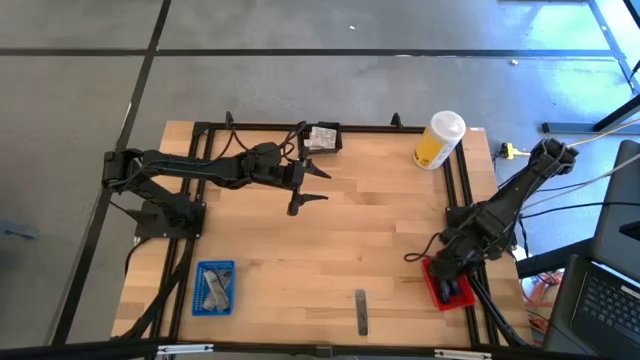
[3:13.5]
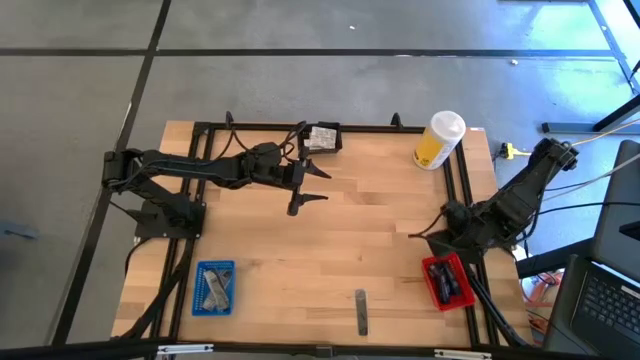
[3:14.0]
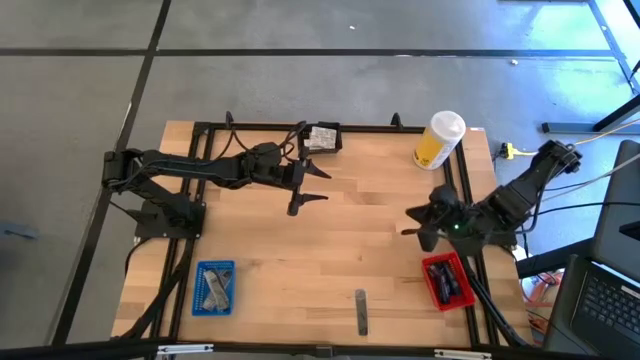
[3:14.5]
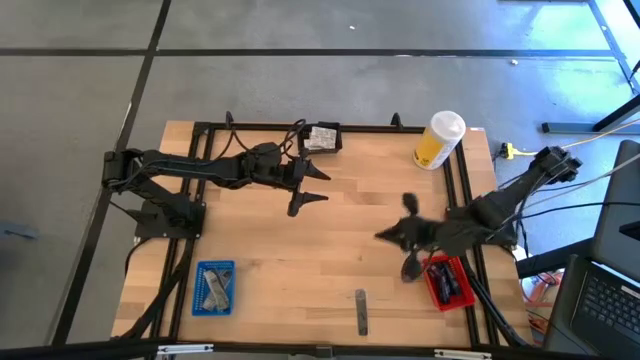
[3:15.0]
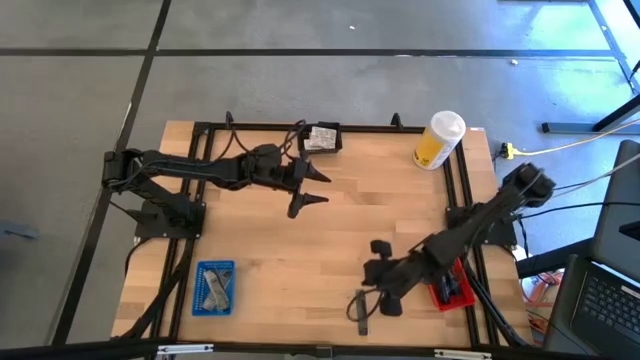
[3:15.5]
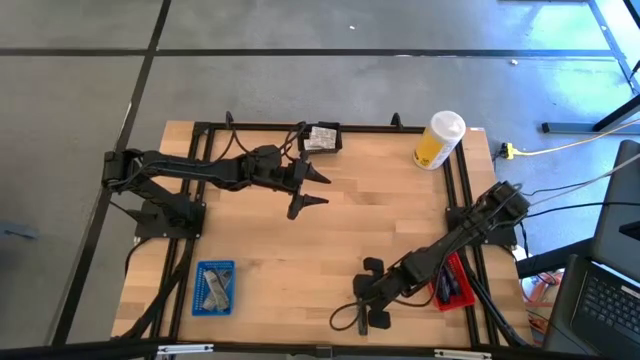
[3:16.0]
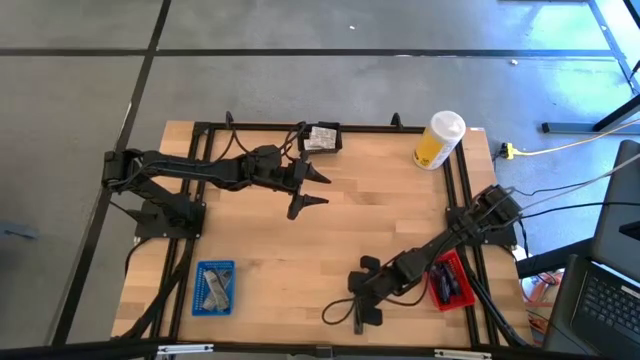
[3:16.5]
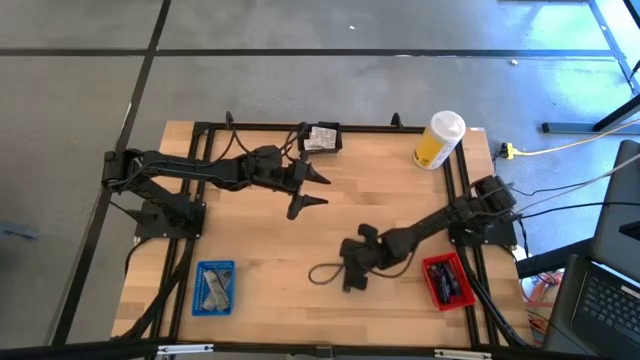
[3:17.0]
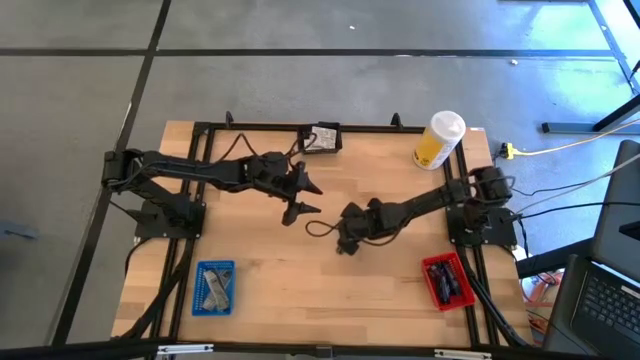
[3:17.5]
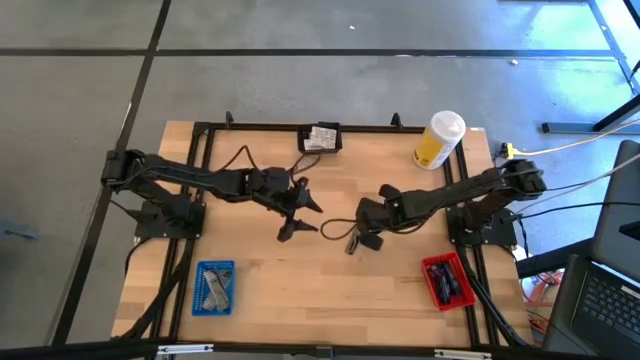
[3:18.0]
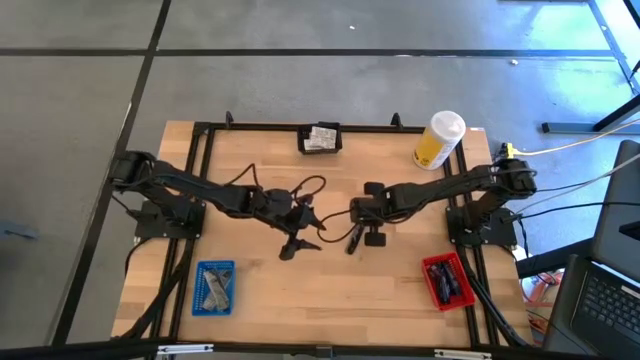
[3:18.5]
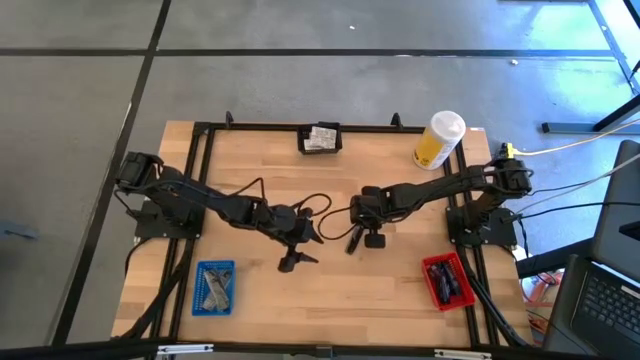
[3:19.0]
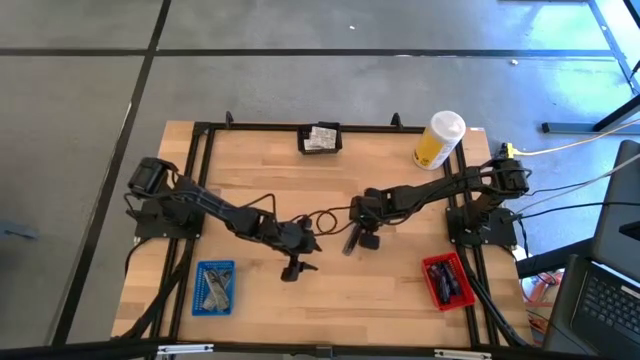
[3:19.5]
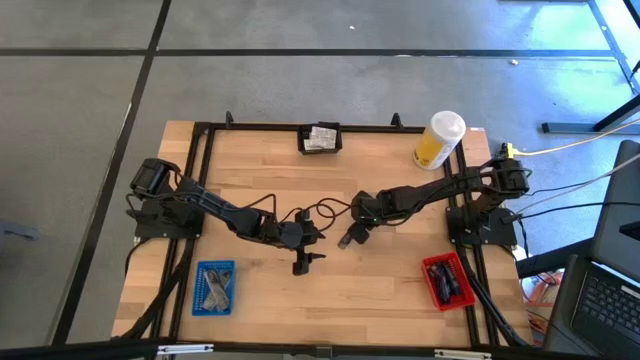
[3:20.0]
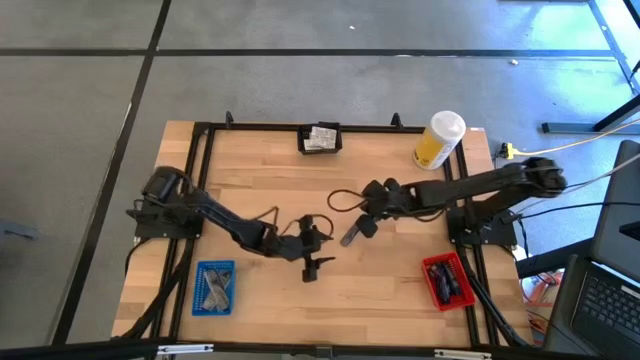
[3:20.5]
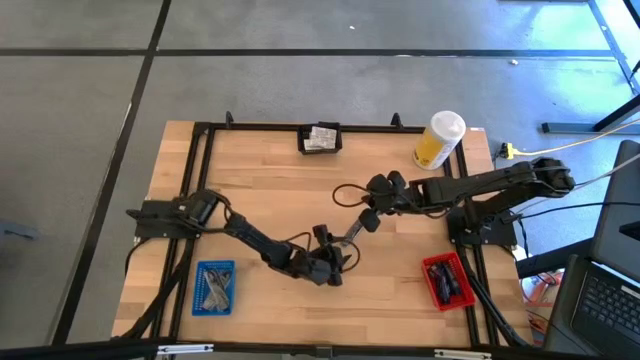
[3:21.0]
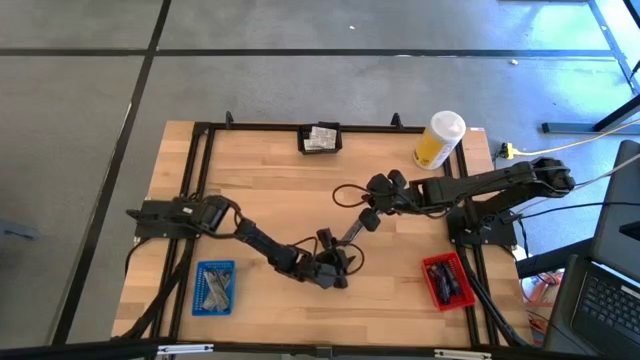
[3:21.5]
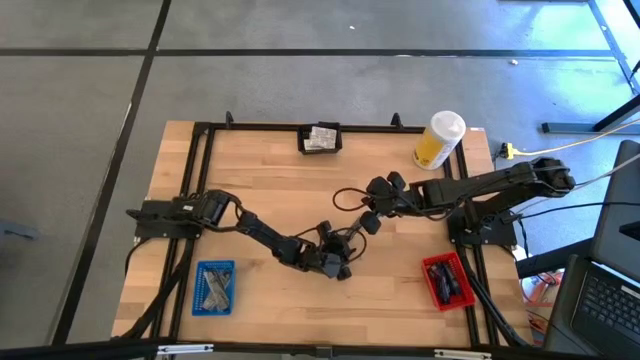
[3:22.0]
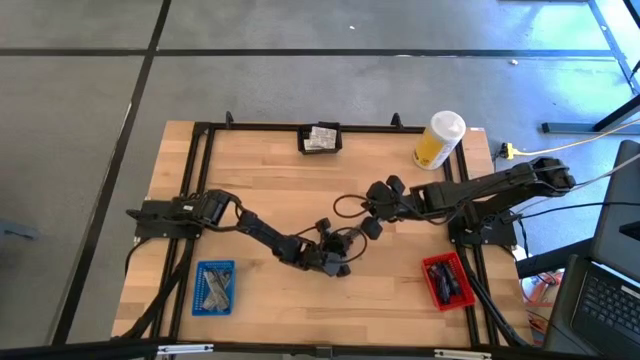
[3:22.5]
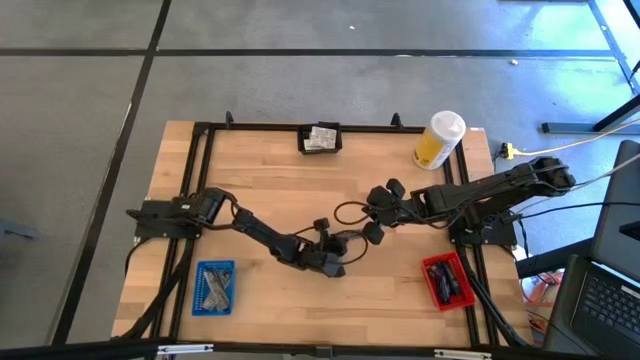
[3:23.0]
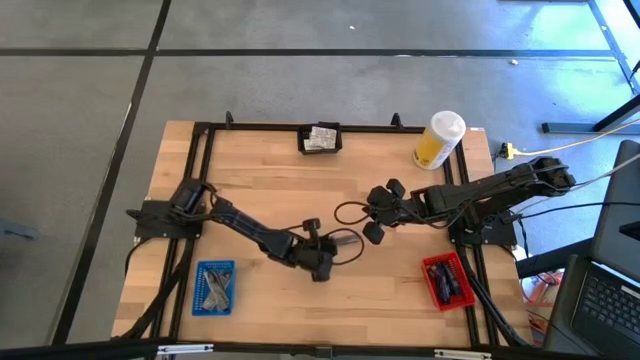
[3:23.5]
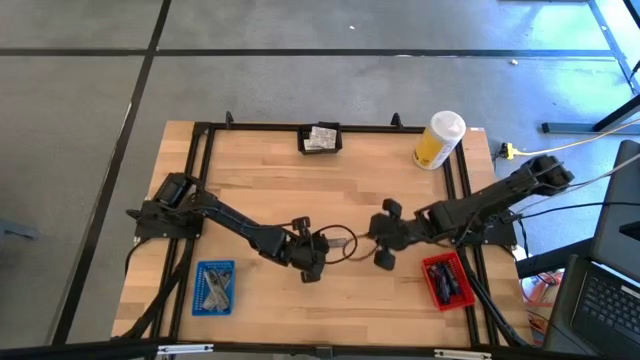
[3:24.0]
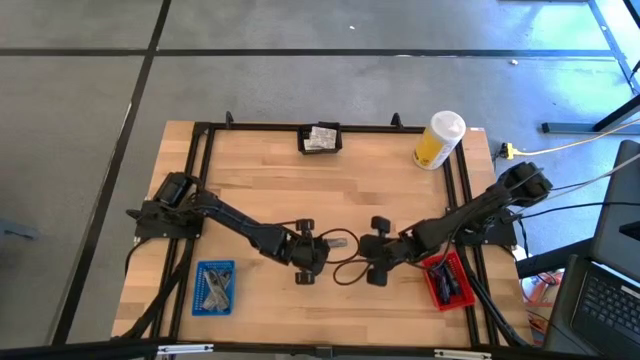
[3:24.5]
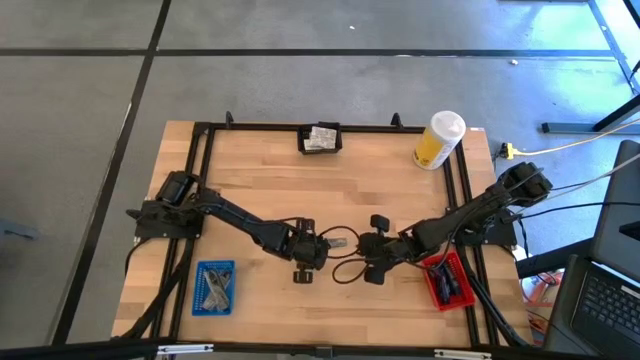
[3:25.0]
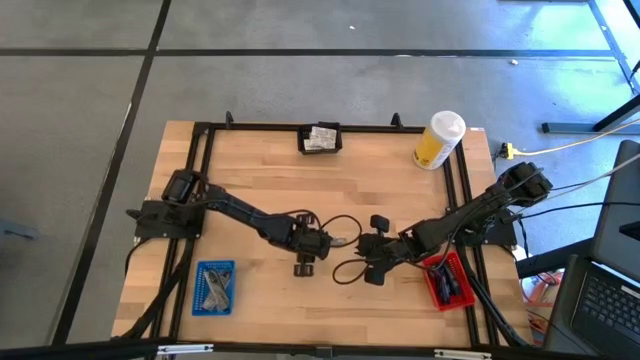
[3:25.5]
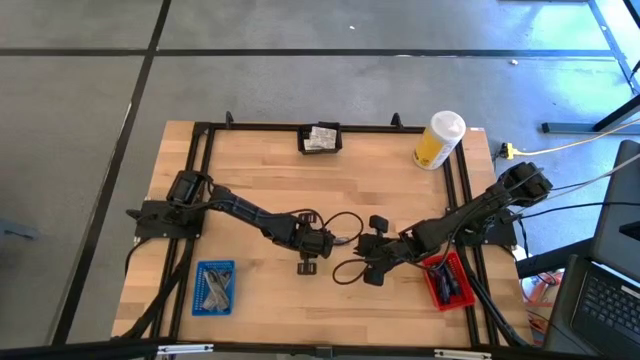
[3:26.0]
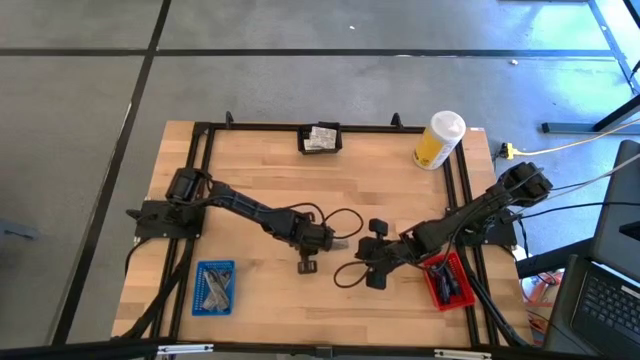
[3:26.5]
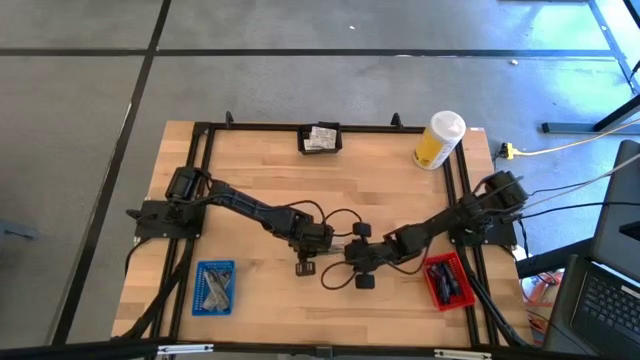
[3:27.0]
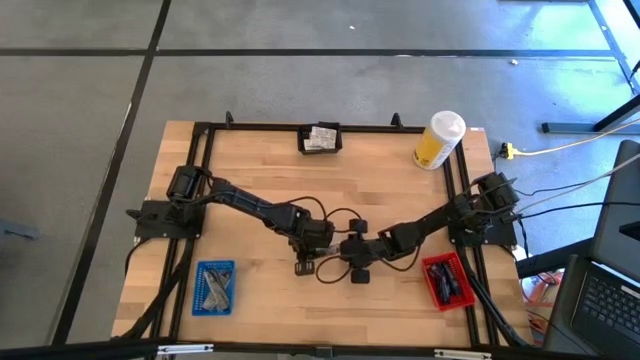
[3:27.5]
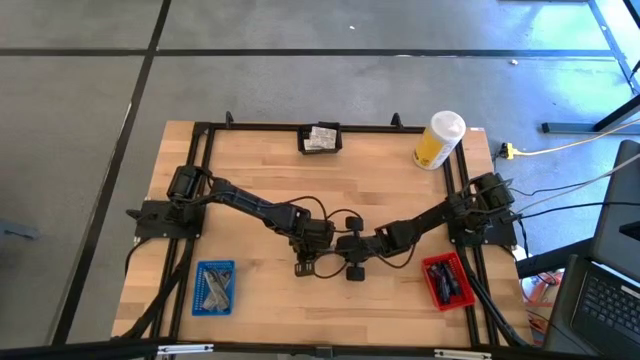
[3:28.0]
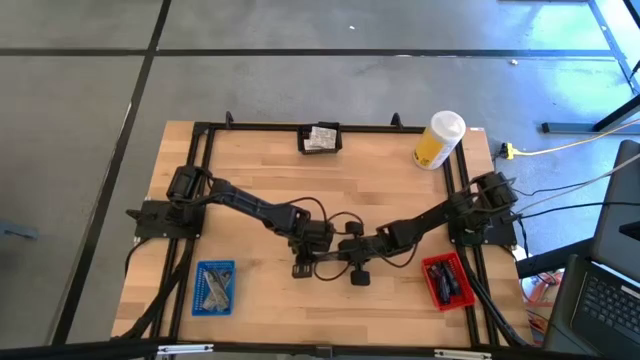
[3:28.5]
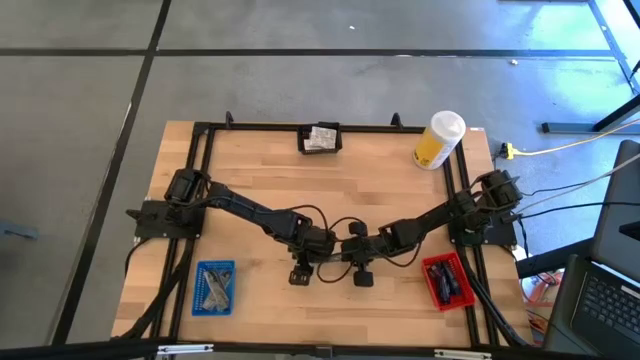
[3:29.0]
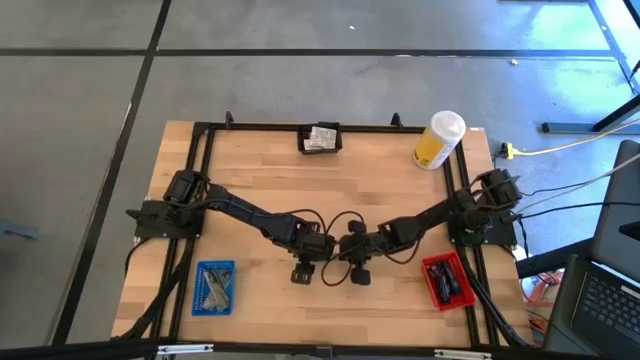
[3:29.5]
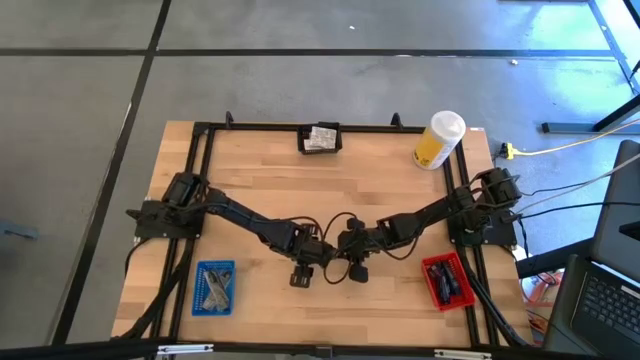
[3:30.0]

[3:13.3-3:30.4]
Task: Pick & Place Travel size toiletries
Put the black comb into the blue bin

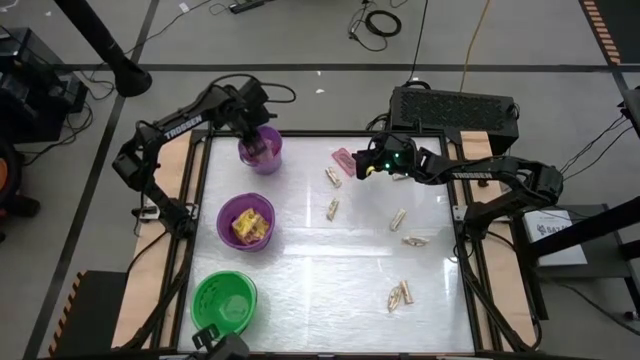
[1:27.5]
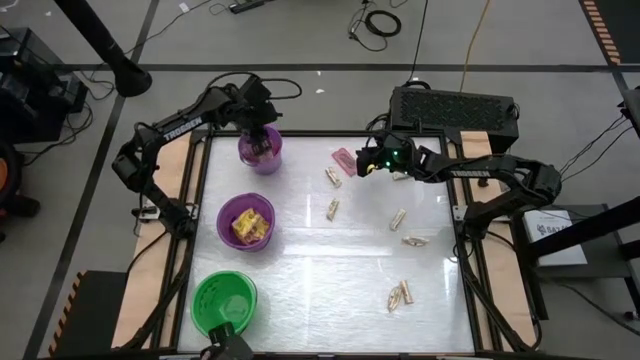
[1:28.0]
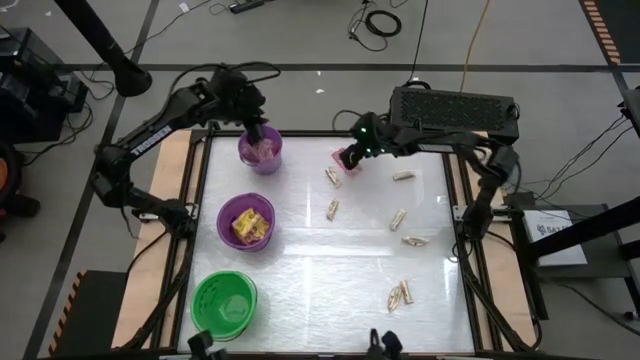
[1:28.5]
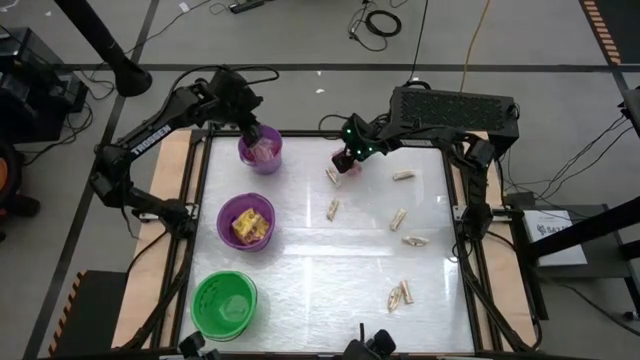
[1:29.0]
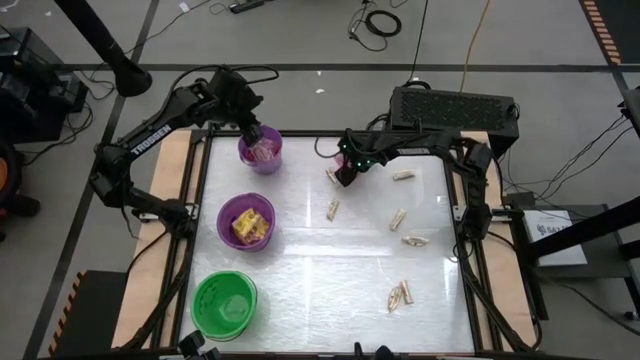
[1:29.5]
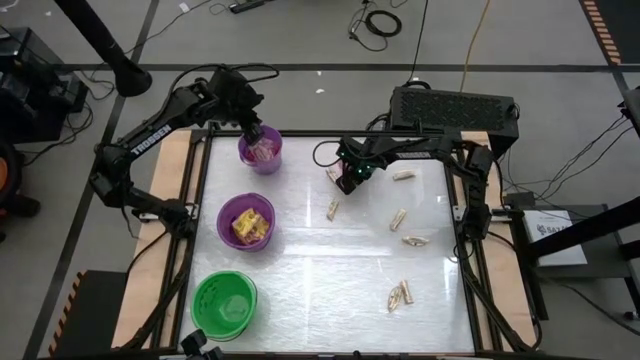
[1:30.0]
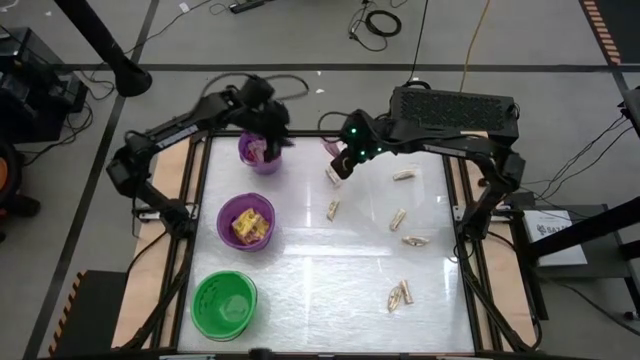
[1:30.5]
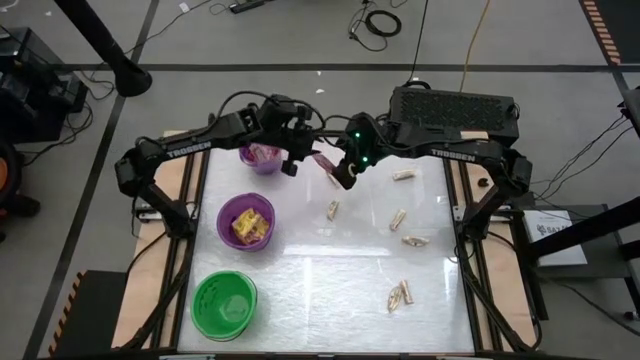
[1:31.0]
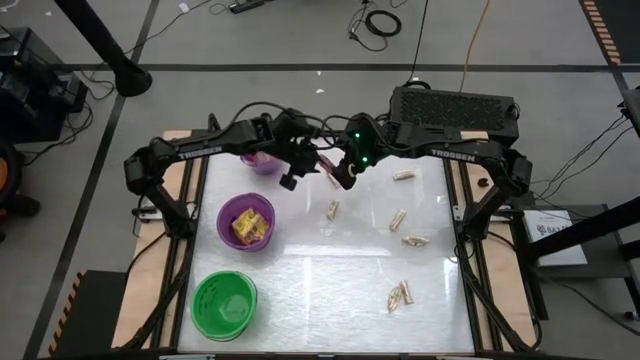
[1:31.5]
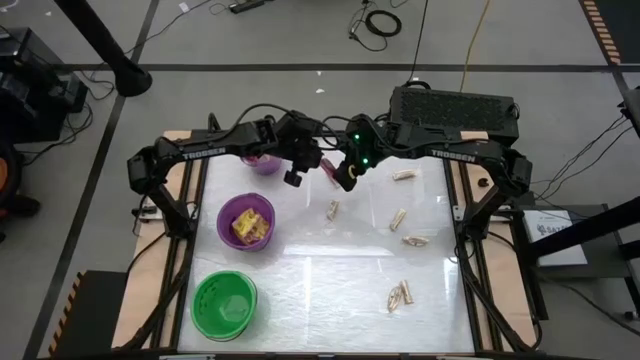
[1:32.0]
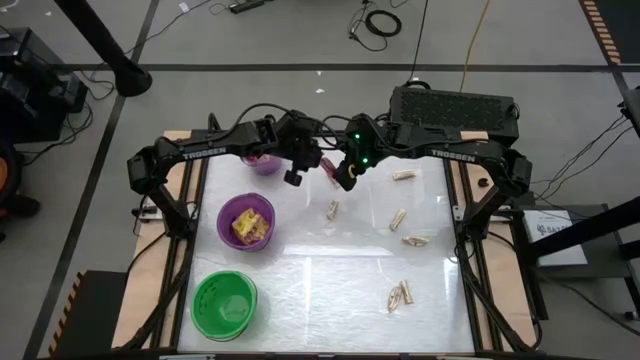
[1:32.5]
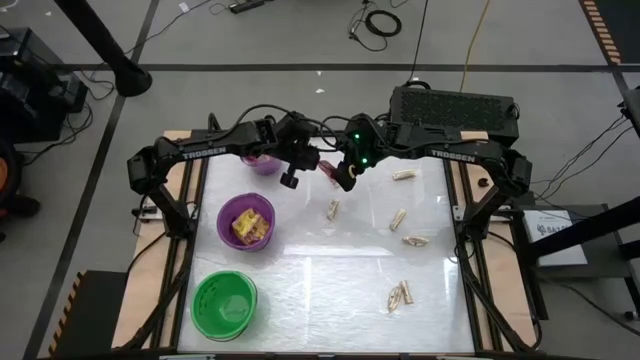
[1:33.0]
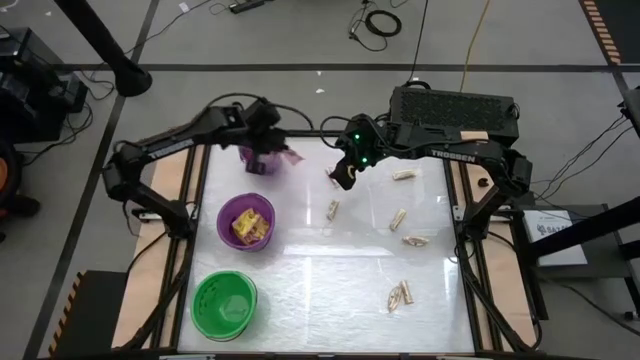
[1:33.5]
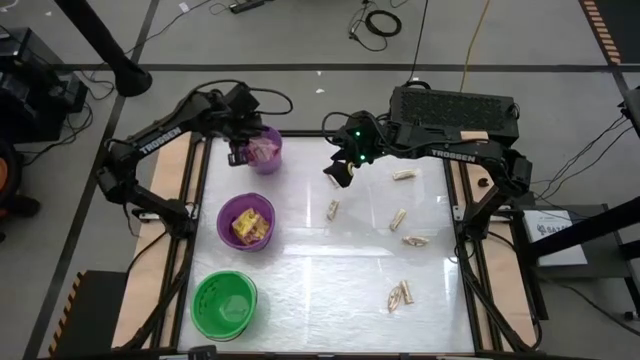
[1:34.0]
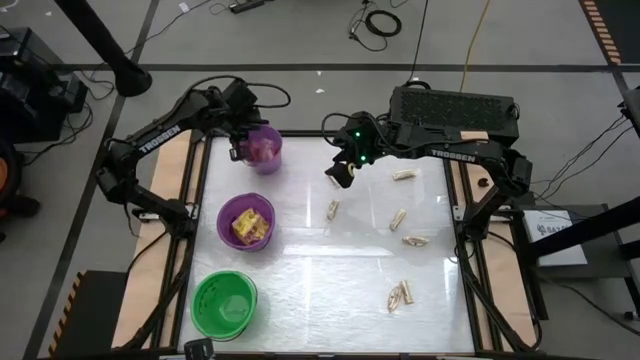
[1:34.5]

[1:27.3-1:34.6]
Task: Sort candy by brand, put in halloween buckets
Put the red candy into the top purple bucket
